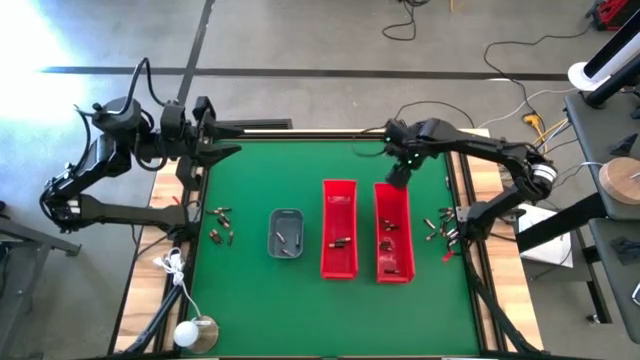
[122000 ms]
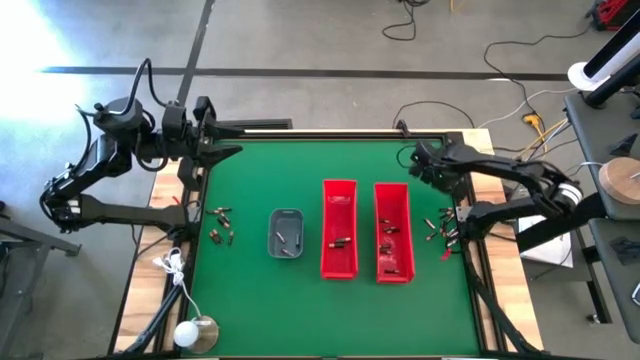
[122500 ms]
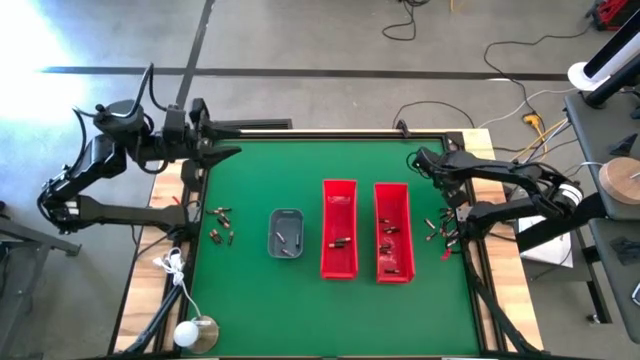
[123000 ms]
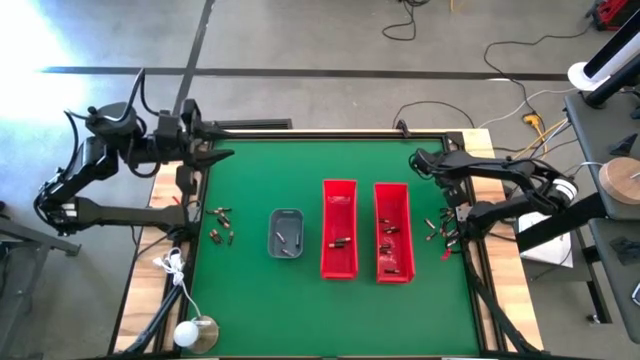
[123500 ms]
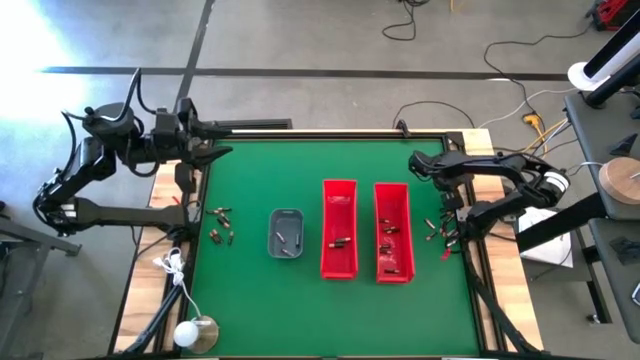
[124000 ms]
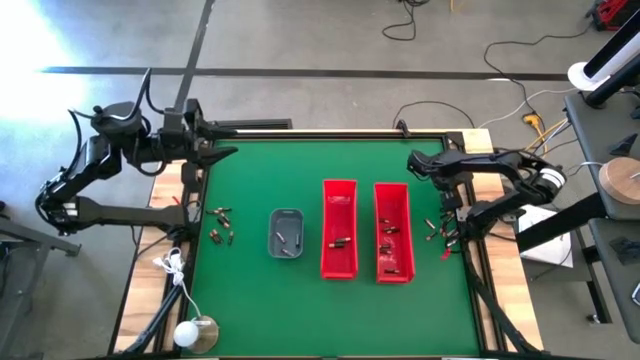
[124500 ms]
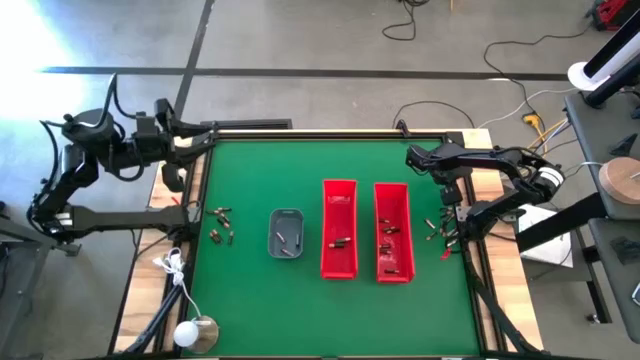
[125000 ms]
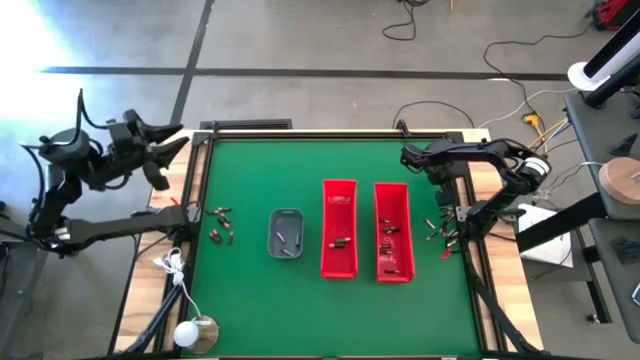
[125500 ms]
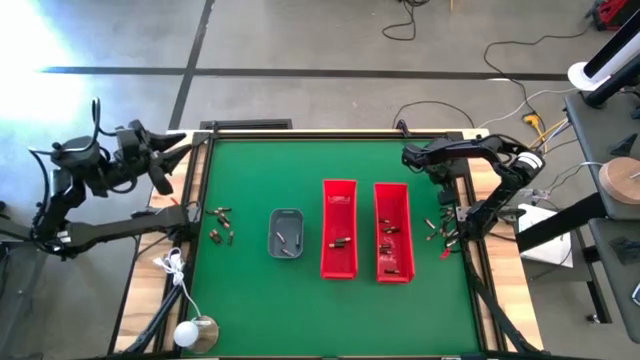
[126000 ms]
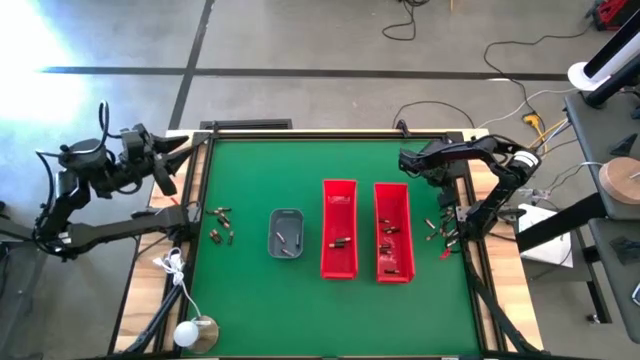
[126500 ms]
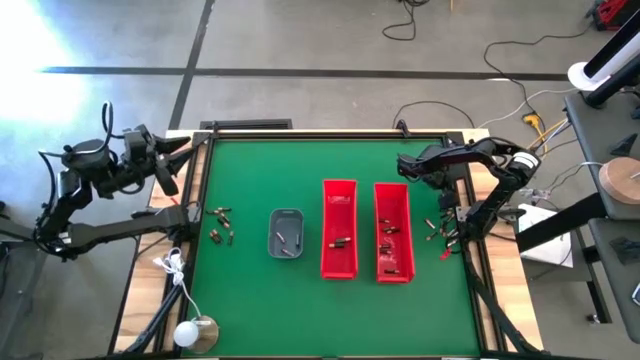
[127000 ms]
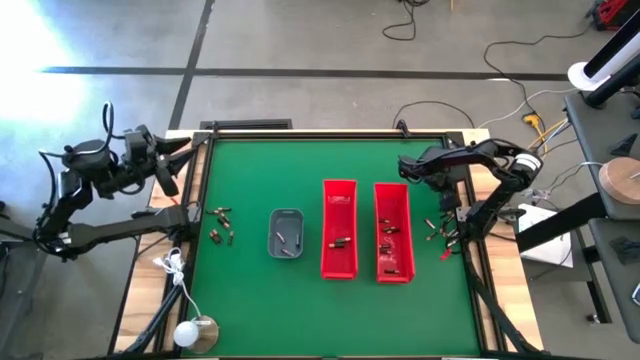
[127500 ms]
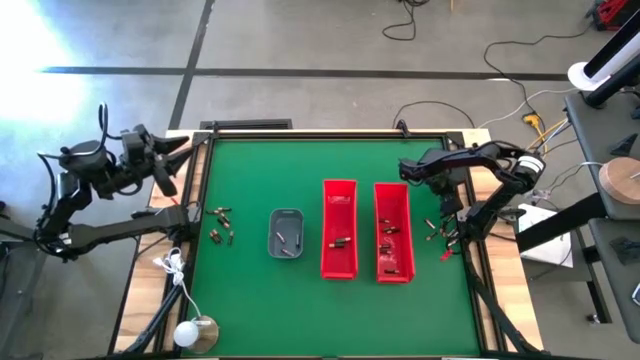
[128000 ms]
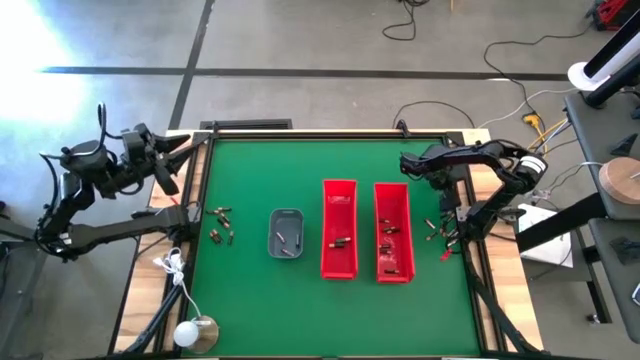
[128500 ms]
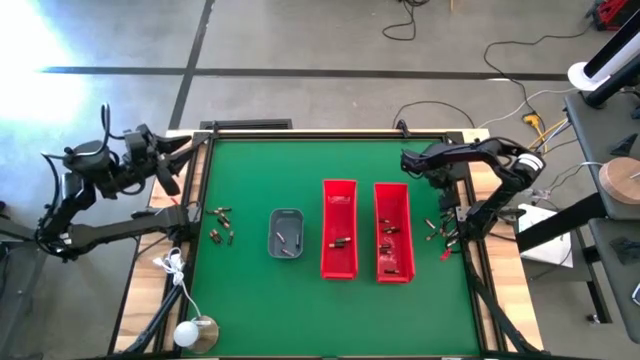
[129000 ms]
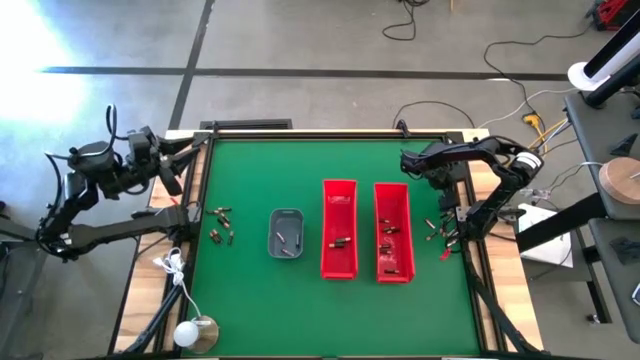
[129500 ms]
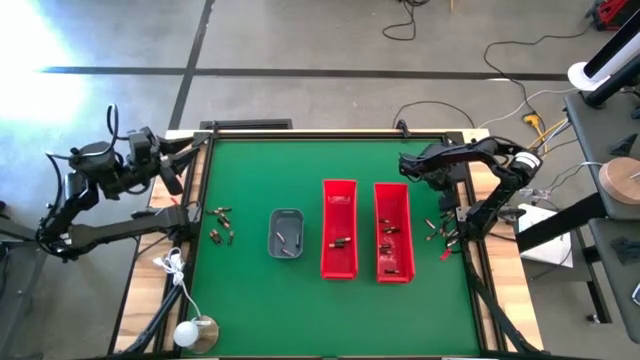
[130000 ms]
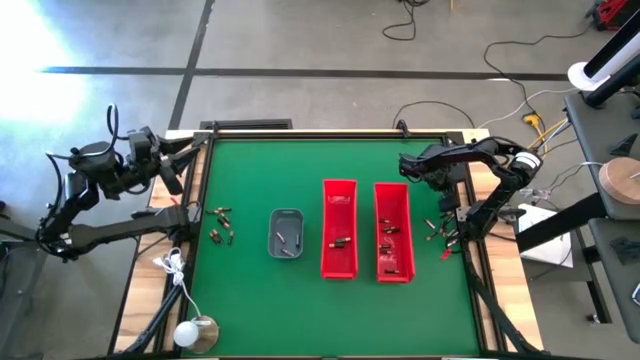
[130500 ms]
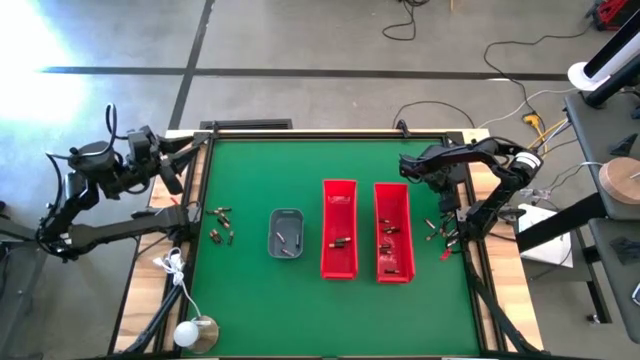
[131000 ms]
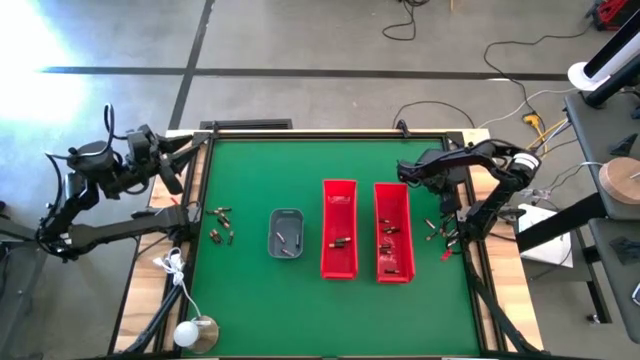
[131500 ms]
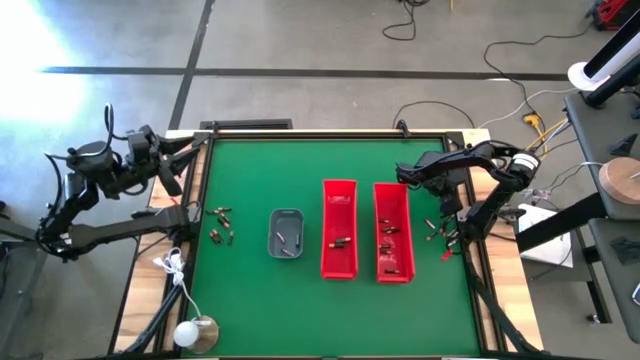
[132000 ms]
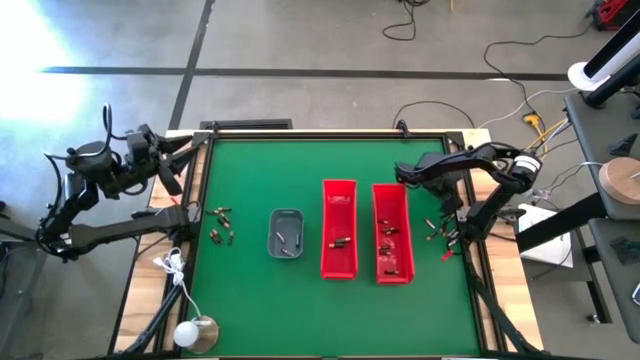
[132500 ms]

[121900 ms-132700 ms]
Task: Sort batteries
Put the small black battery into the right red bin

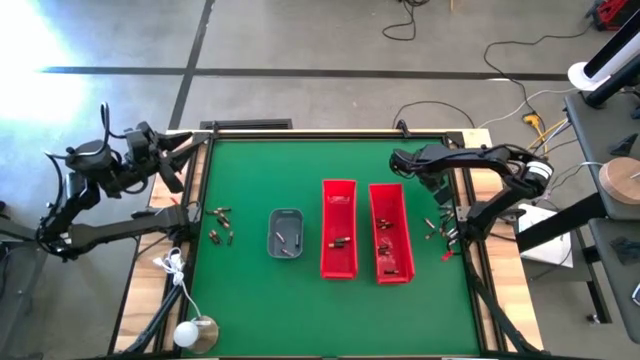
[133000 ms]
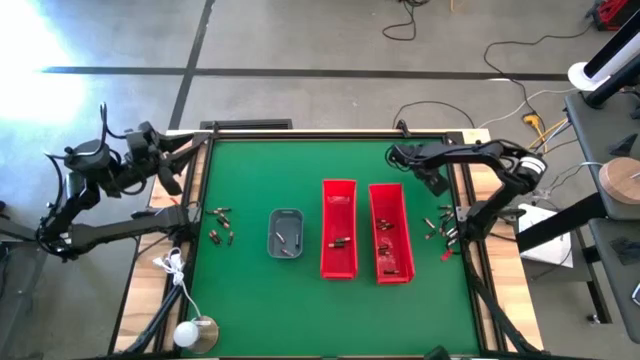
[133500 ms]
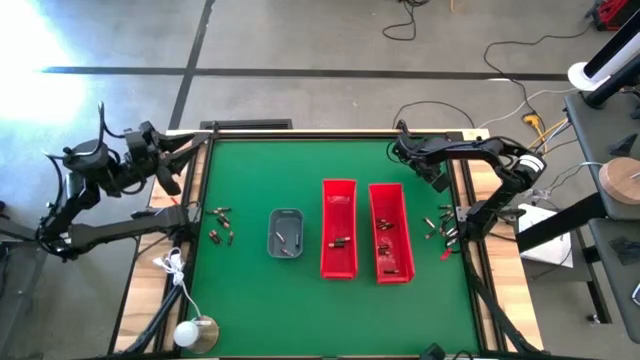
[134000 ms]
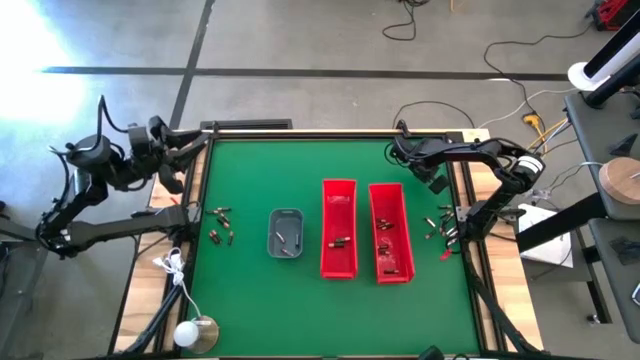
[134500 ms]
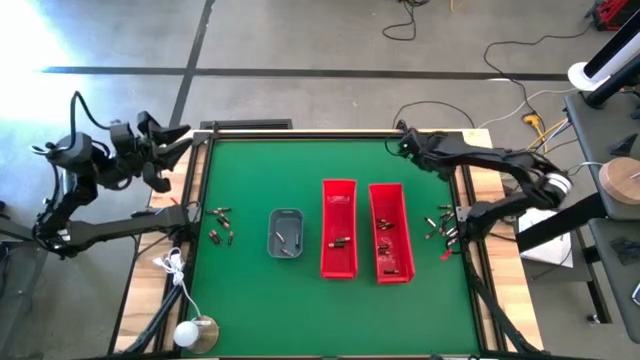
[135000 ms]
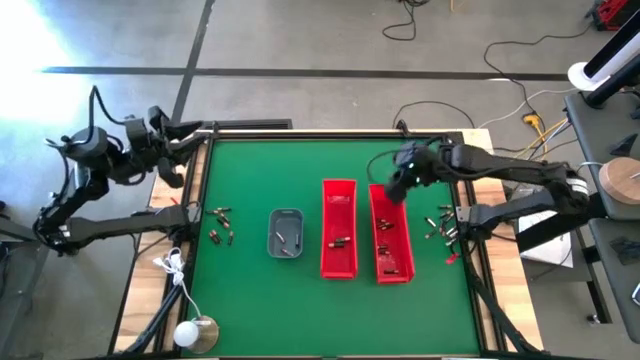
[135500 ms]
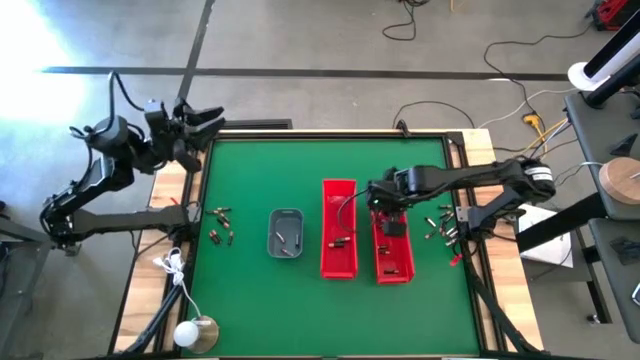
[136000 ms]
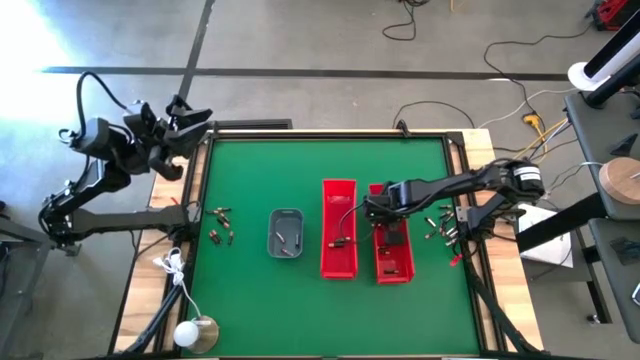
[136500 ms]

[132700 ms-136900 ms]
Put the small black battery into the right red bin

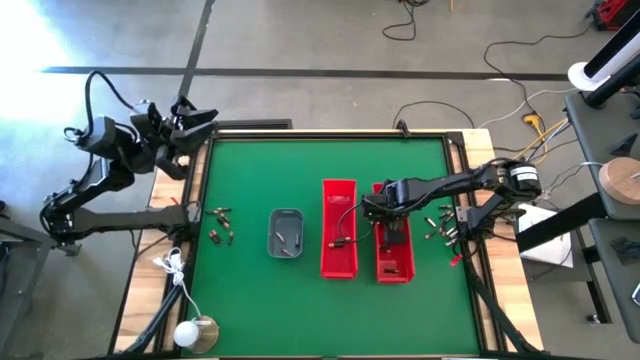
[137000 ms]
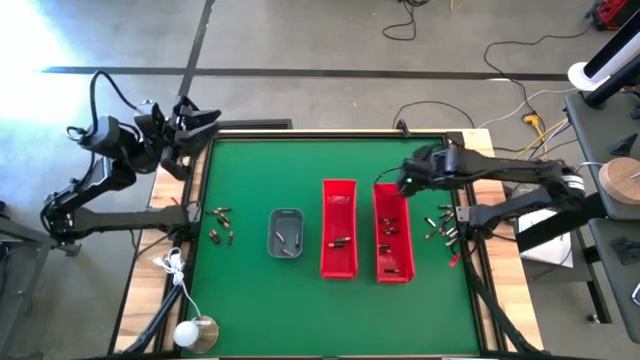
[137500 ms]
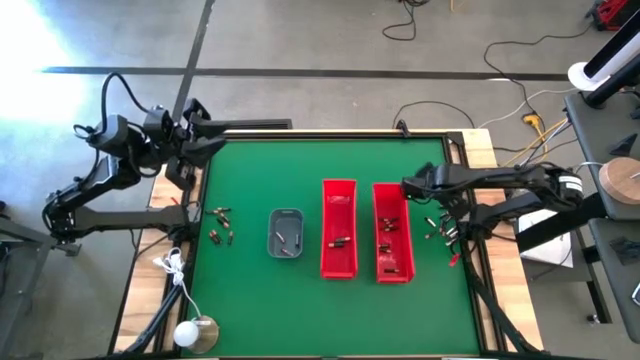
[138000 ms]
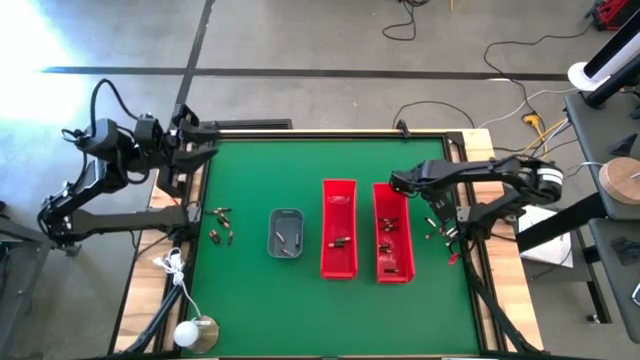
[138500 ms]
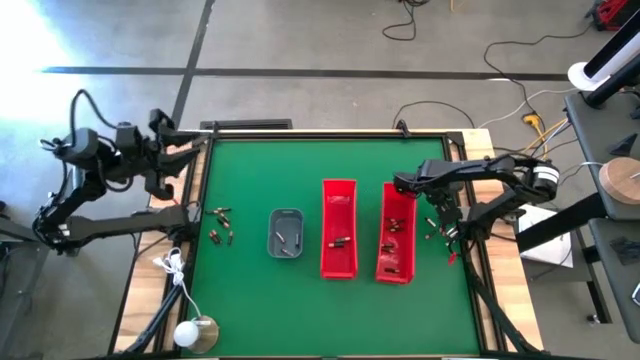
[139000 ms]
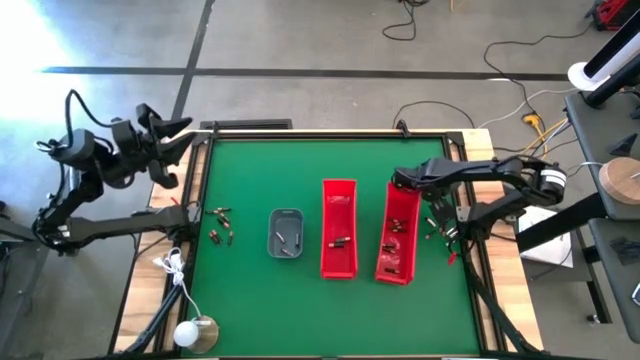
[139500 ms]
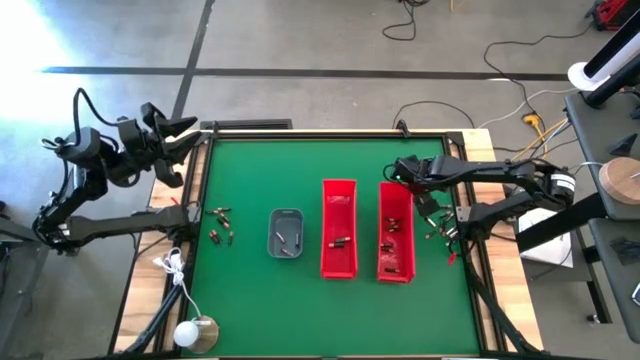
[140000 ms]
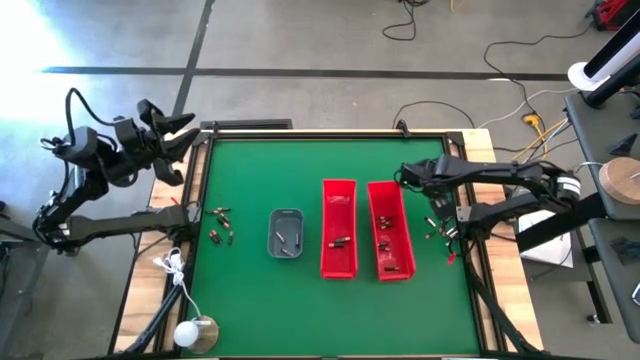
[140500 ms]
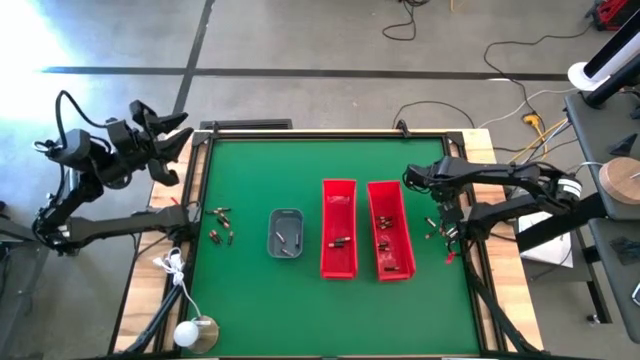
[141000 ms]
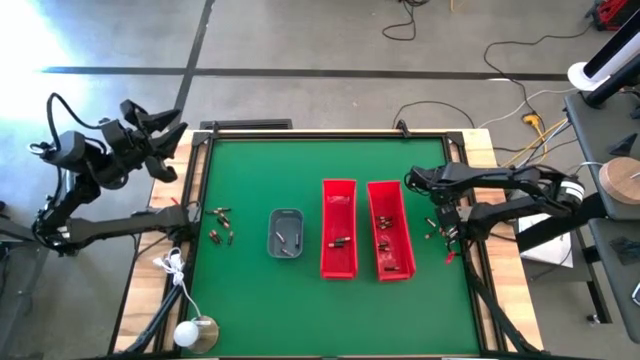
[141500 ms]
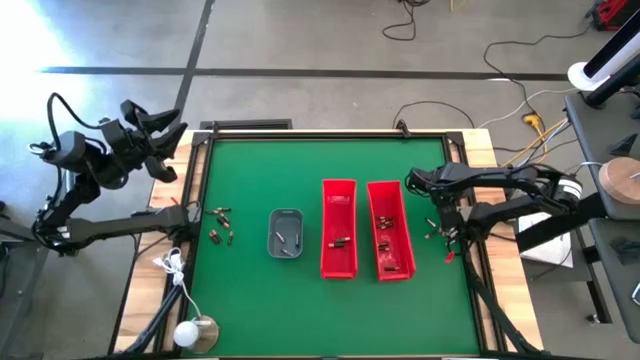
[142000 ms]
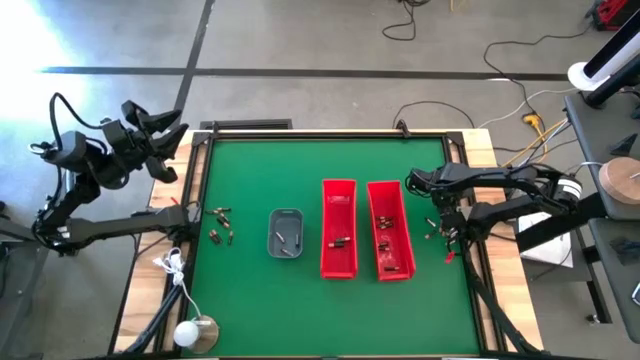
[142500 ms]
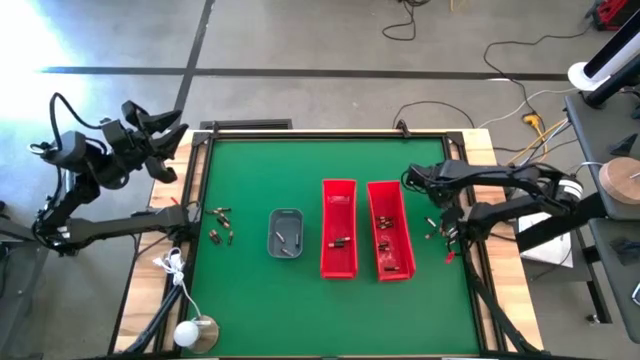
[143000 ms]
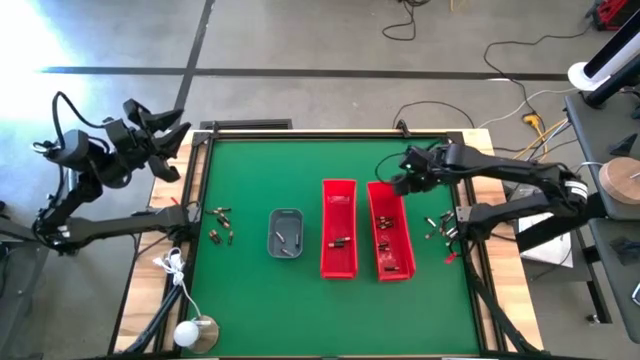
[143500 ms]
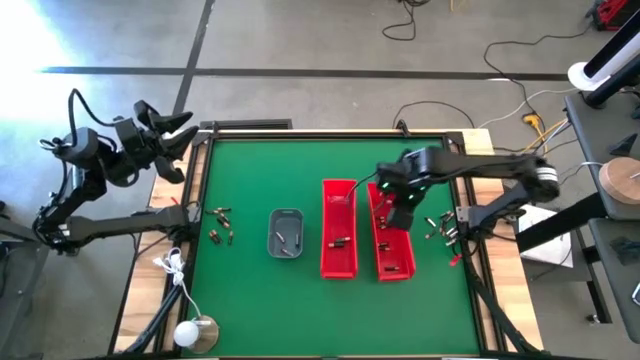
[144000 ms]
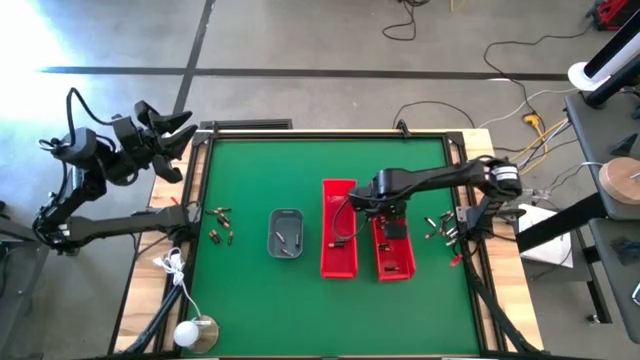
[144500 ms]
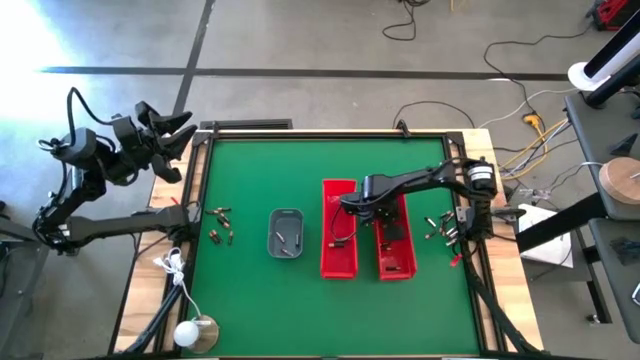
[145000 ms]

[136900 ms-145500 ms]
Put the small black battery into the right red bin
